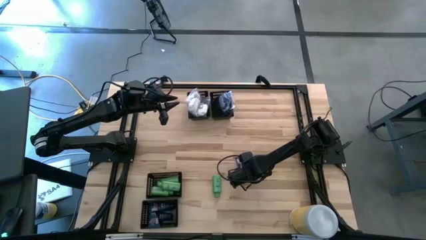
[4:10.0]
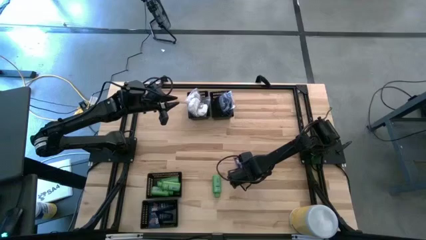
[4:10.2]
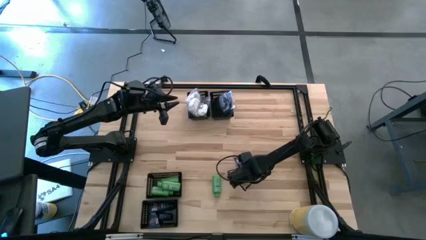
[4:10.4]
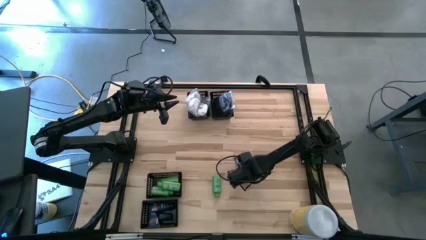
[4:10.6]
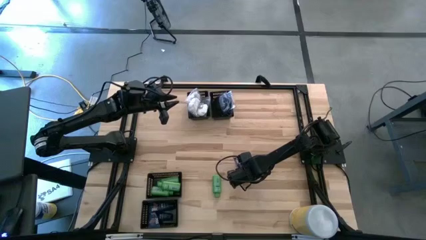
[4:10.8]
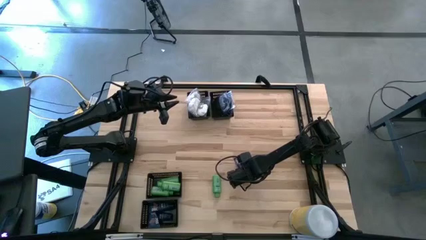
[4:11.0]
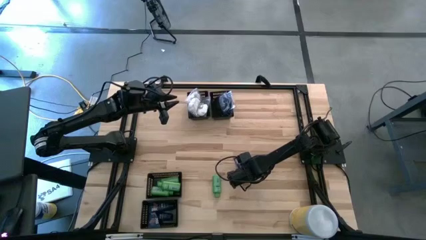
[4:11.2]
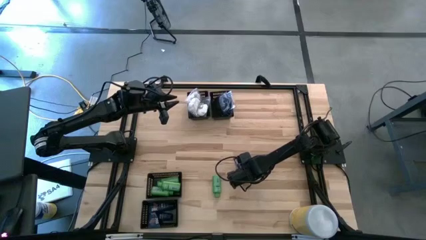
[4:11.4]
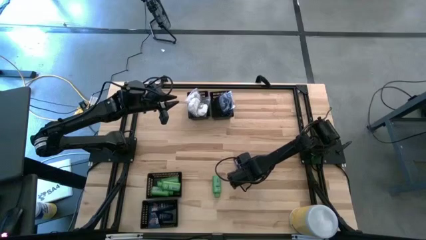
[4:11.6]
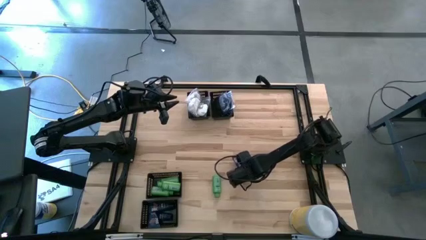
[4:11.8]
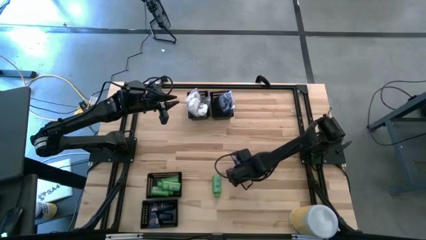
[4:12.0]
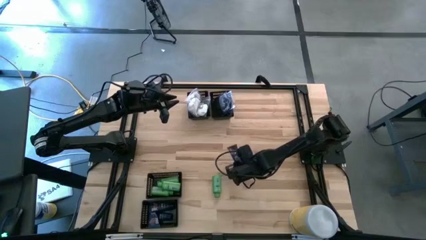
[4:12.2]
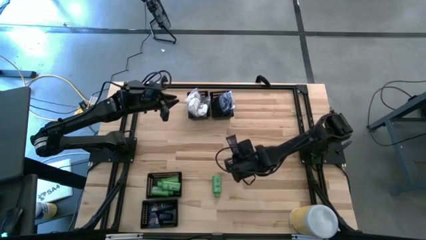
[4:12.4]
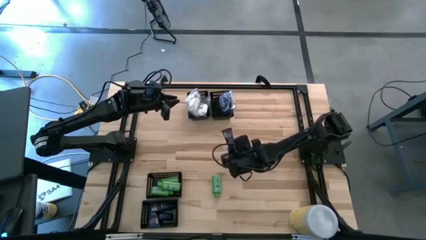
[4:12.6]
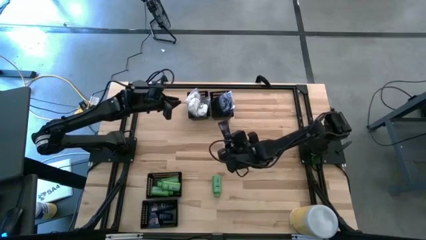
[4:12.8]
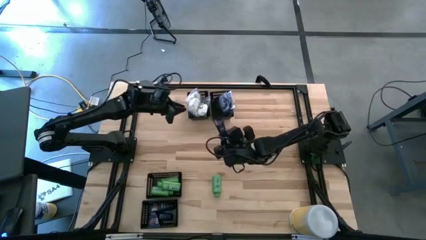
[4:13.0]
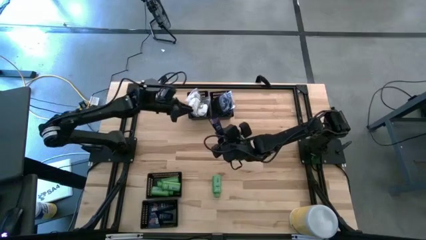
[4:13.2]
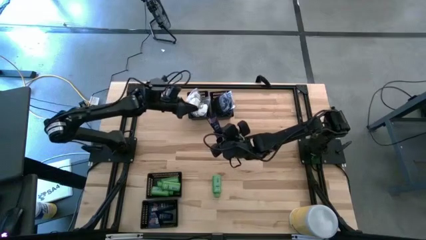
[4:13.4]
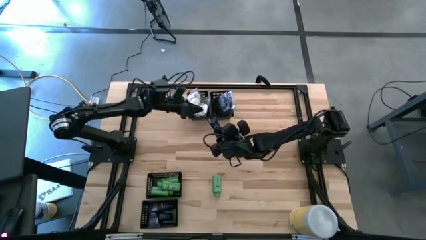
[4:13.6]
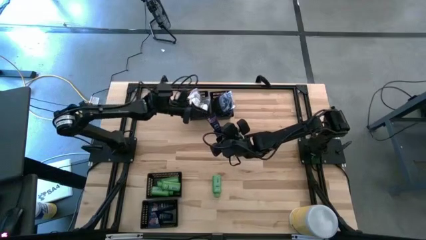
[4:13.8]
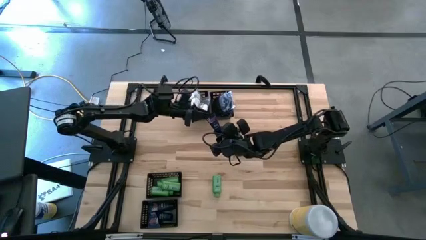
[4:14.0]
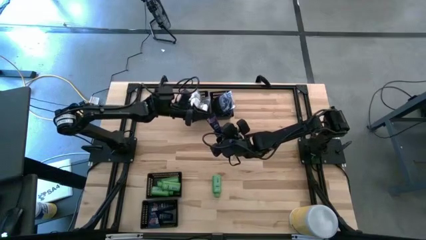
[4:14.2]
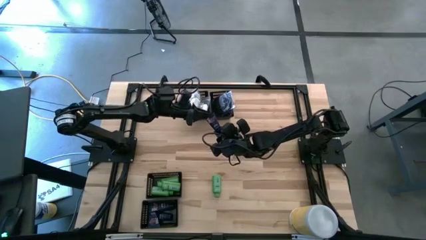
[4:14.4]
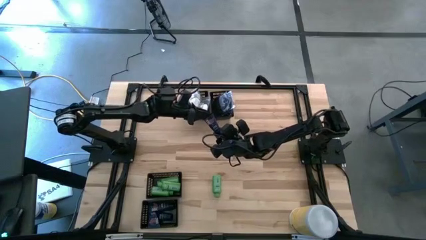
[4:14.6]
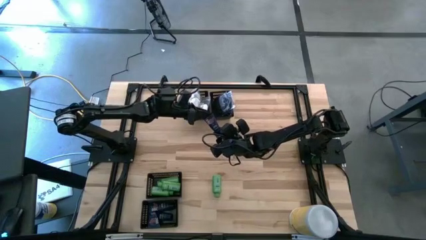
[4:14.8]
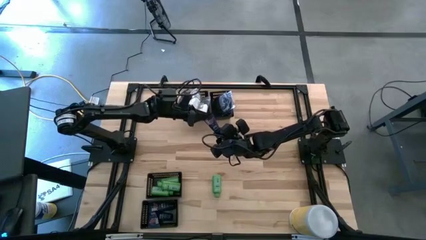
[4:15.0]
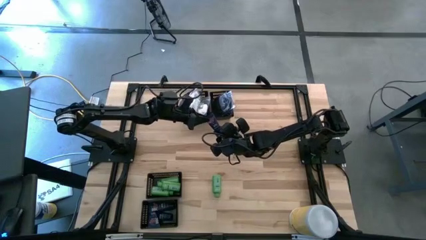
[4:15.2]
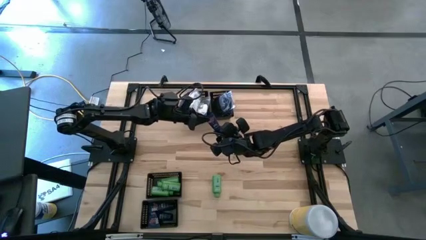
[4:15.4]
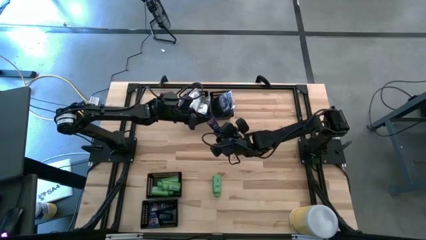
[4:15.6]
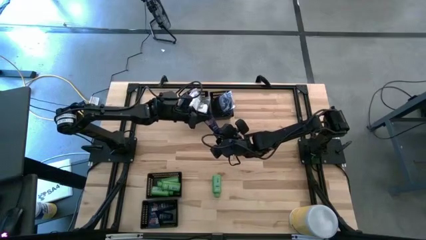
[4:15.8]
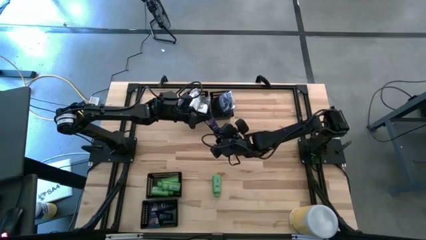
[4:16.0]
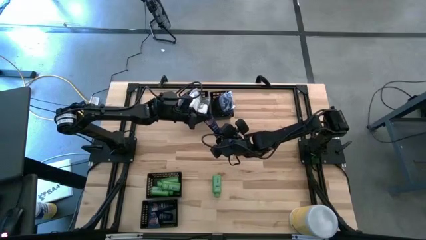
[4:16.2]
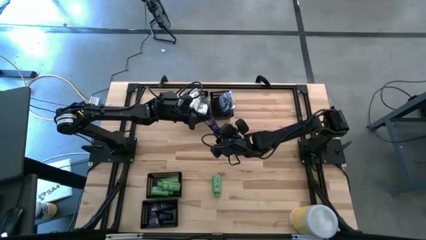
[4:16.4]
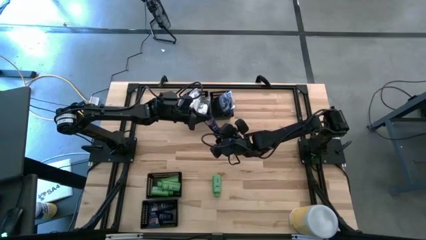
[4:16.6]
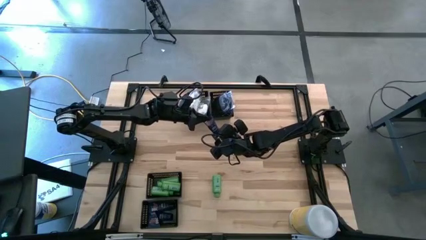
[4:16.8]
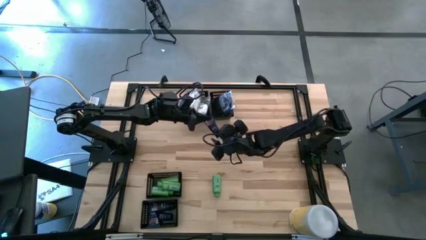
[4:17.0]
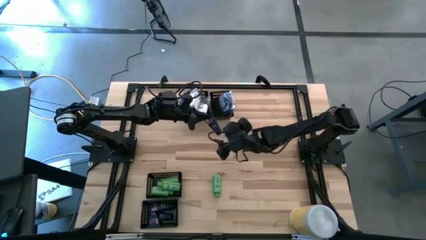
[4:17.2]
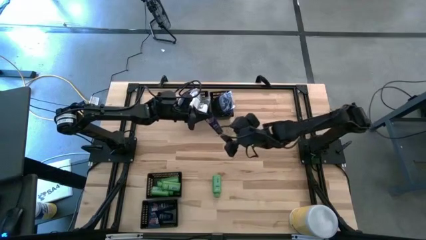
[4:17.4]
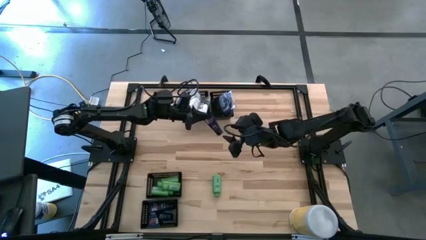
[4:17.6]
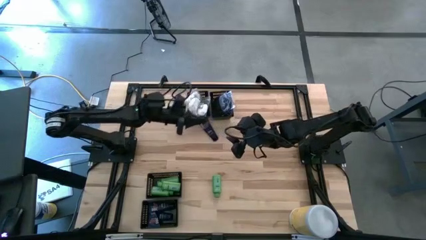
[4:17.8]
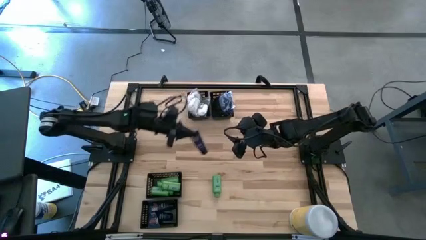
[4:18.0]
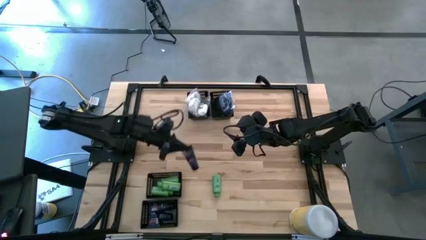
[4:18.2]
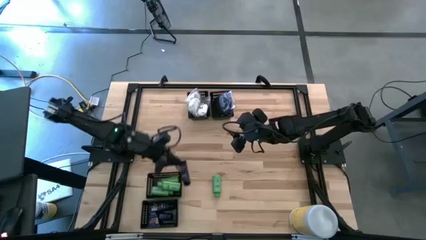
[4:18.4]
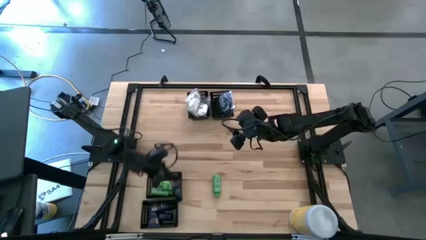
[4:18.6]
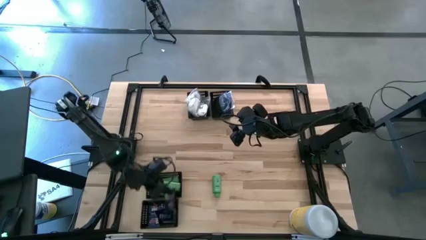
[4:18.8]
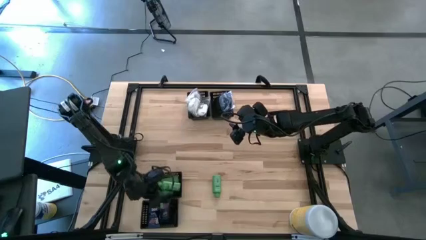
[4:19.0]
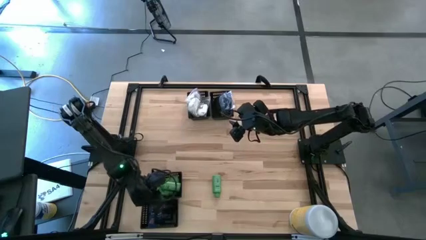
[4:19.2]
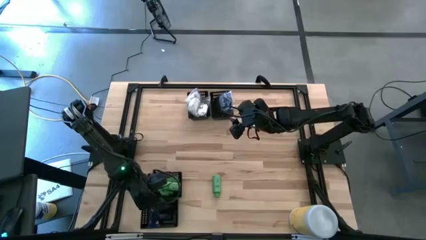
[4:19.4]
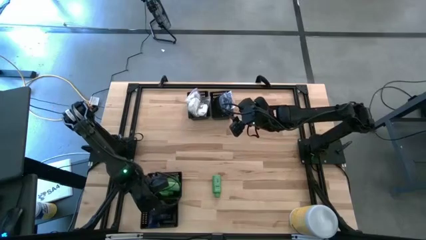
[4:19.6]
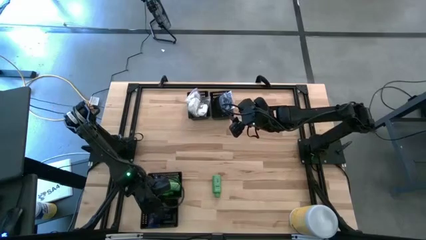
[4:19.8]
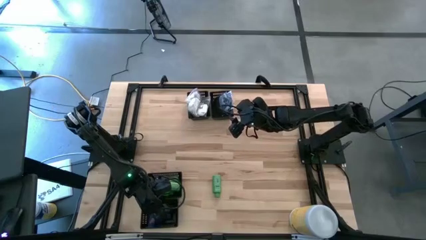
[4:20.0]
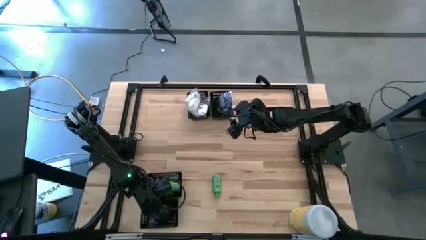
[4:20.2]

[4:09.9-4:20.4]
Task: Pick & Place Travel size toiletries
Put the dark blue shave cream into the bottom left basket

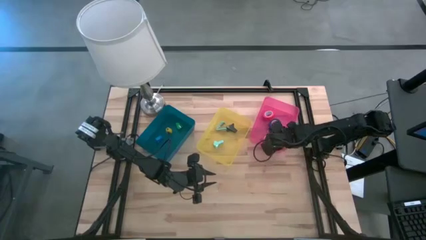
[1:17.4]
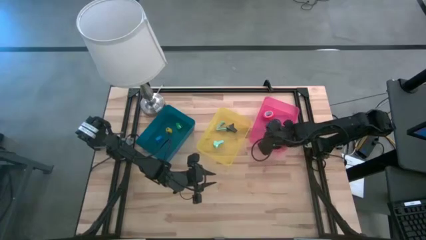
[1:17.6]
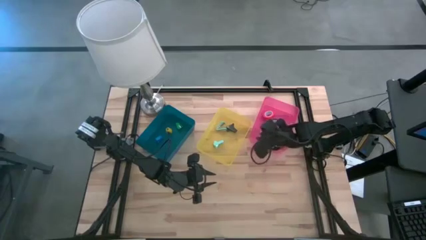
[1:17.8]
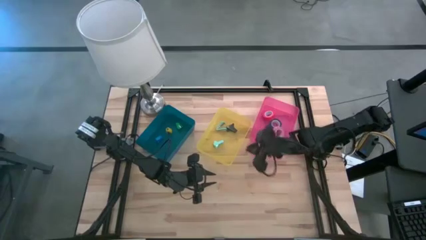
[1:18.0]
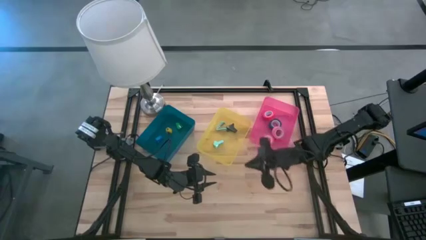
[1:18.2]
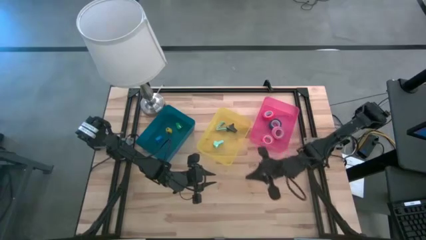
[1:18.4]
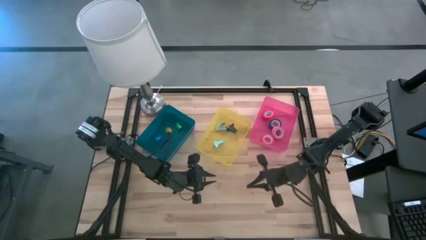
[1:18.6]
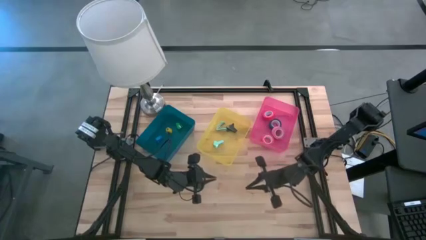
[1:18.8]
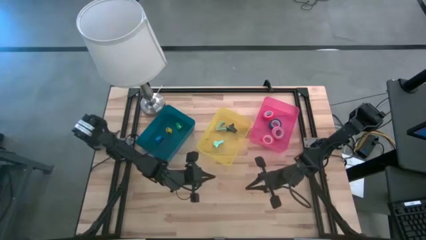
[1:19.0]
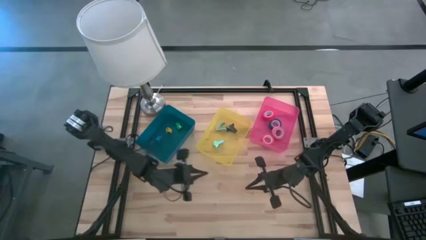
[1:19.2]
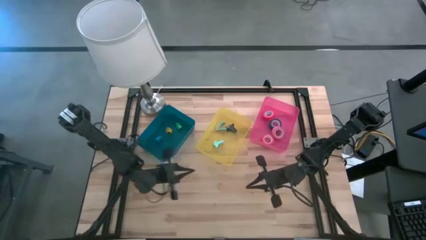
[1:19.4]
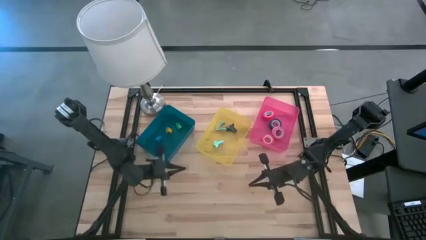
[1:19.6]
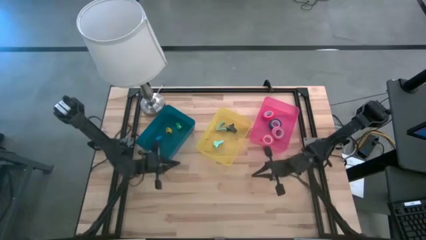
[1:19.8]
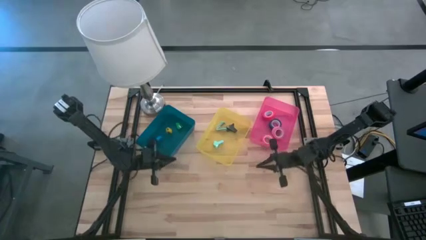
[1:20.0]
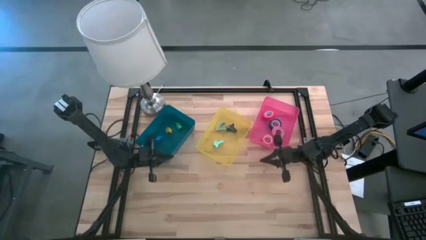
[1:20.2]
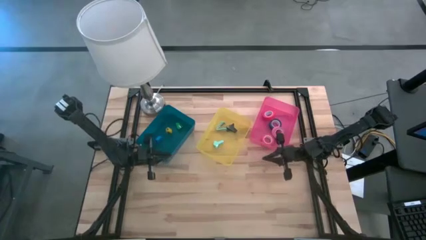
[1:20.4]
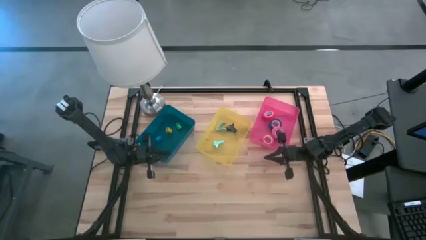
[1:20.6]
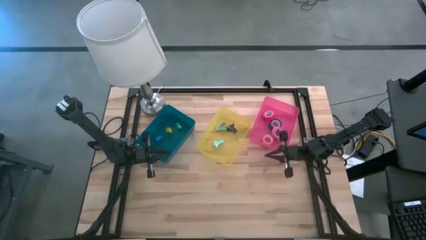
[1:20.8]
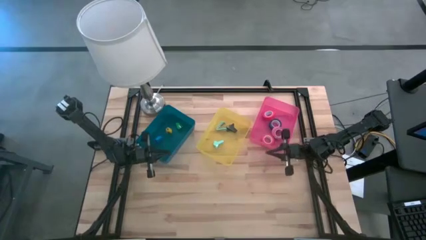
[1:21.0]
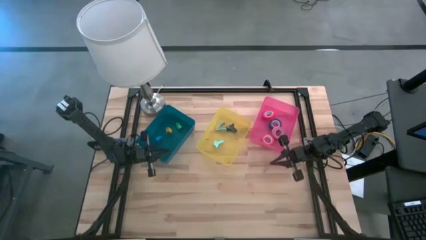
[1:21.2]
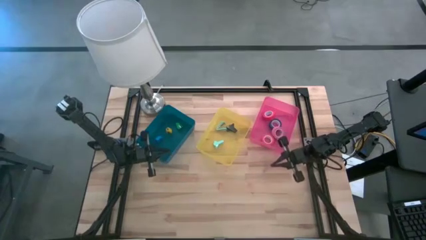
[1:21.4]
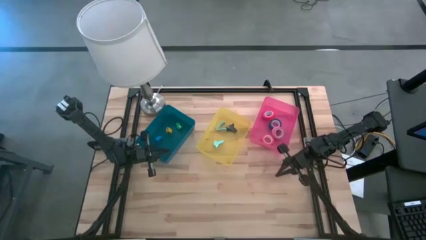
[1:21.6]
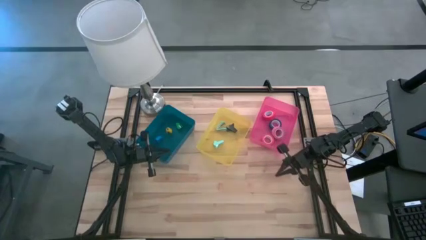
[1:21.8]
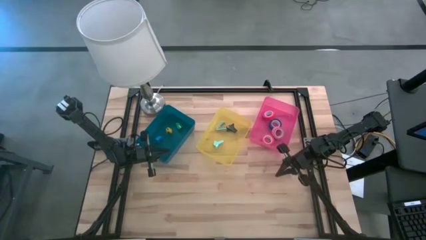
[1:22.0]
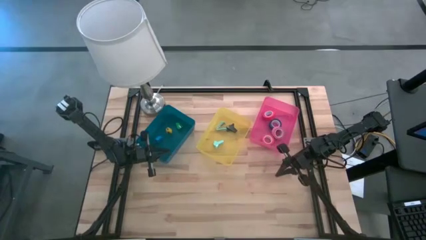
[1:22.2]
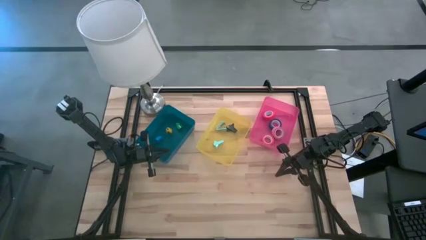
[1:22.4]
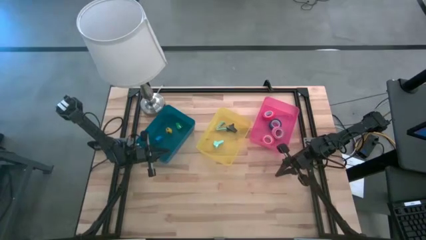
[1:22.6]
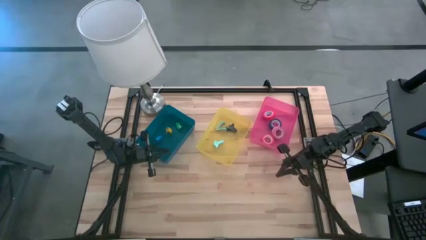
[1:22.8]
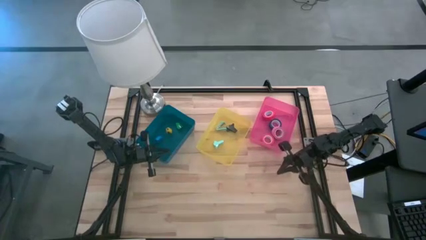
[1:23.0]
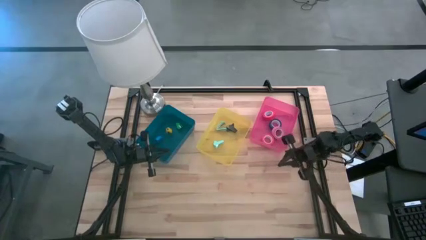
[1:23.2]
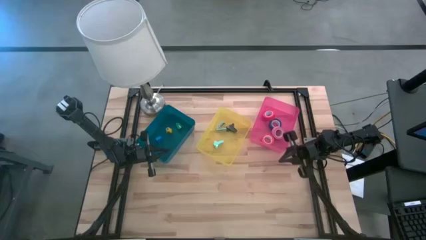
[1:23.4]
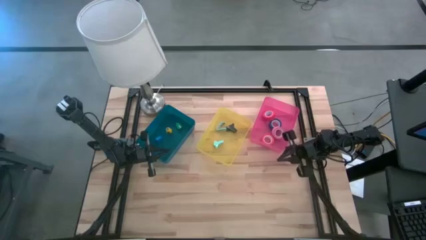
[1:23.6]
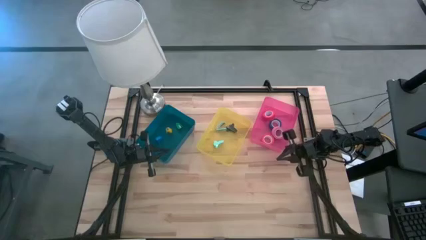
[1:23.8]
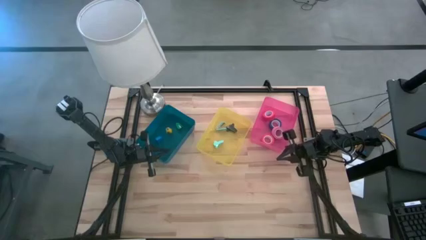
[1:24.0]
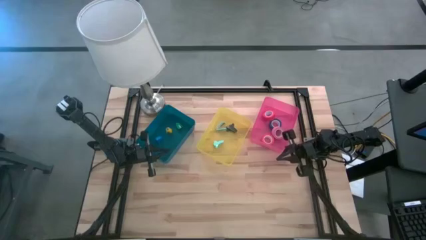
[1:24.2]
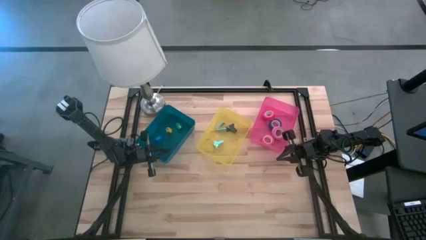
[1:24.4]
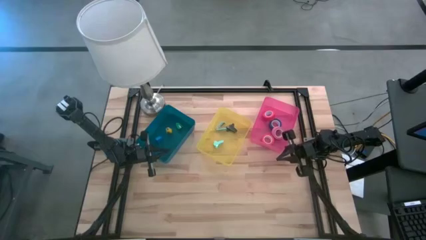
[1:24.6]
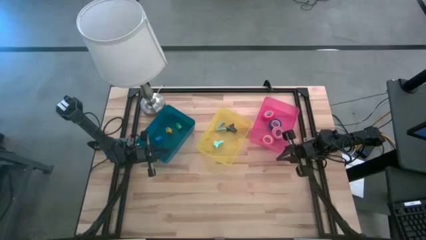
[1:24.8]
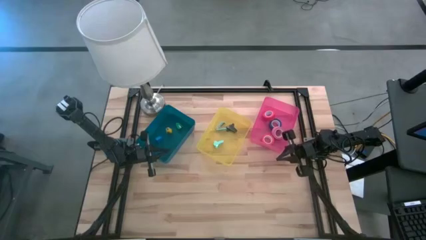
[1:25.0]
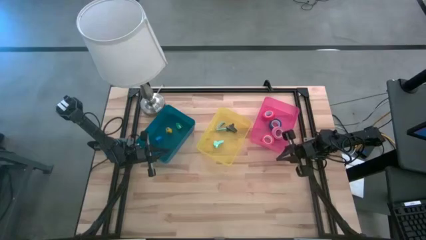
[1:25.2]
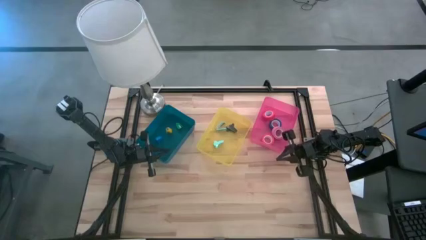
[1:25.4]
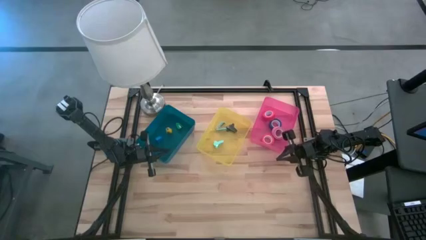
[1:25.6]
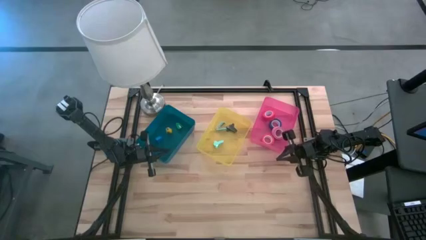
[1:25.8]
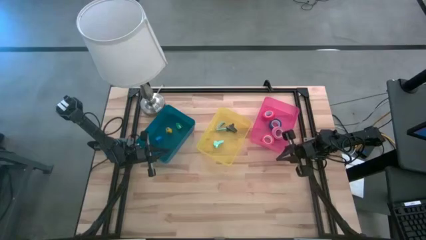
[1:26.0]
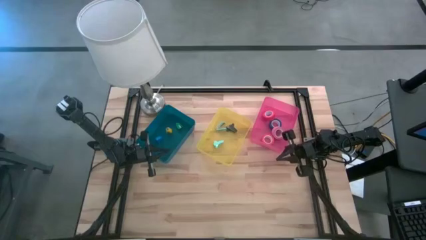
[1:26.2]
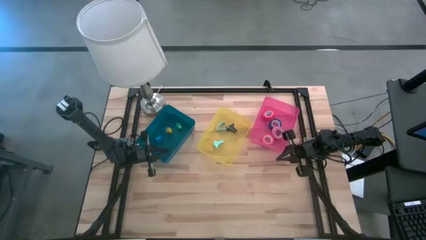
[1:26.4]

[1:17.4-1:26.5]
Task: Pick and place Stapler, Stapler remover, tape
Return to Home Position
